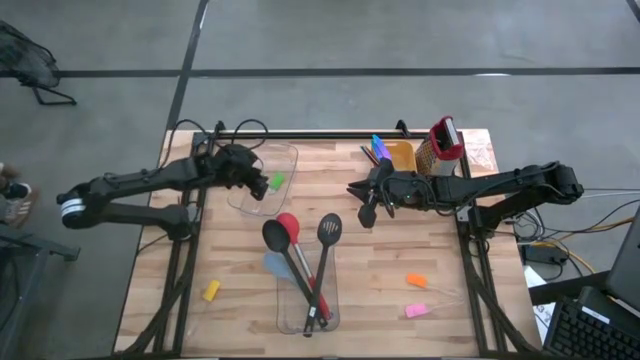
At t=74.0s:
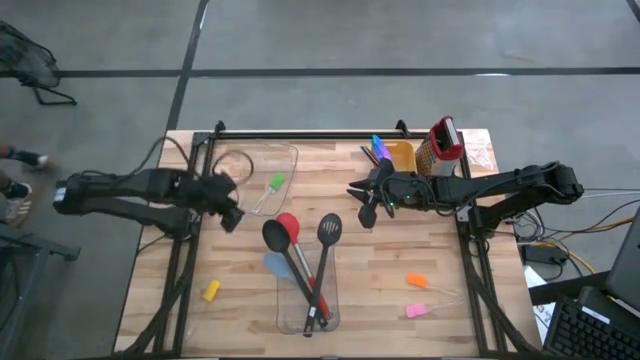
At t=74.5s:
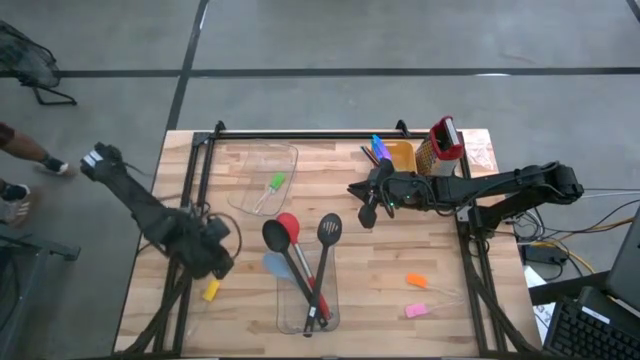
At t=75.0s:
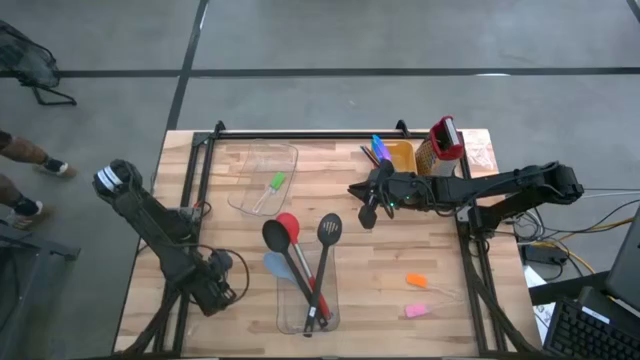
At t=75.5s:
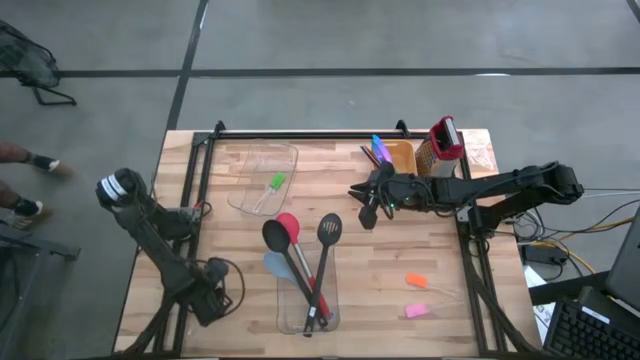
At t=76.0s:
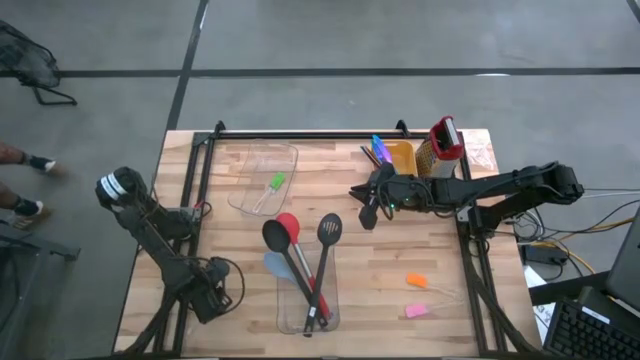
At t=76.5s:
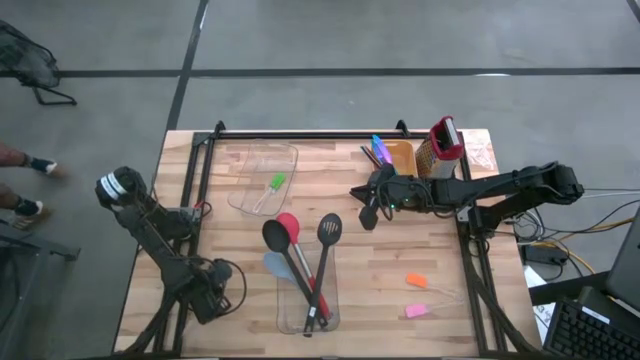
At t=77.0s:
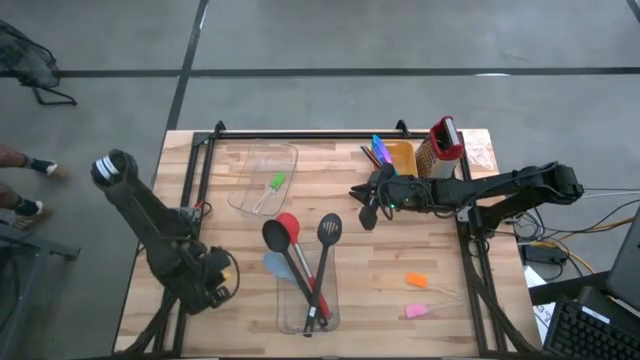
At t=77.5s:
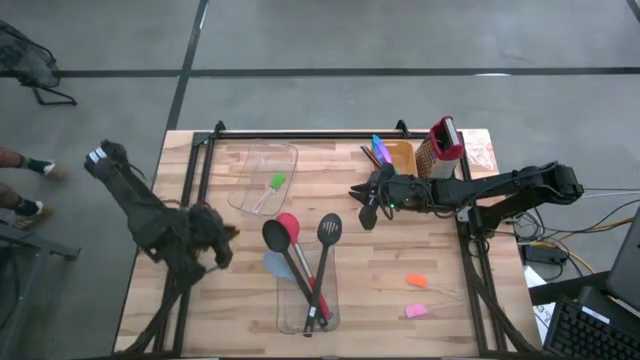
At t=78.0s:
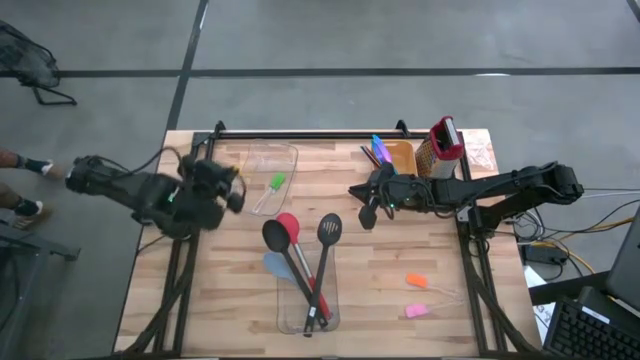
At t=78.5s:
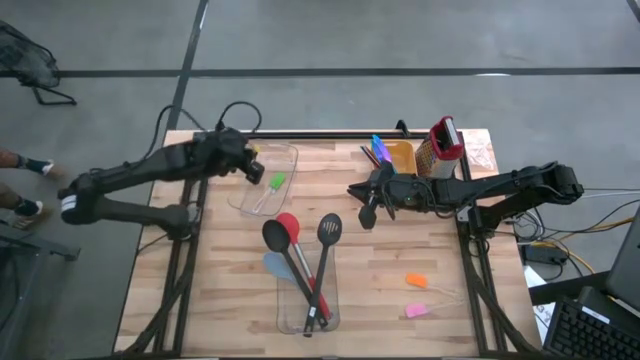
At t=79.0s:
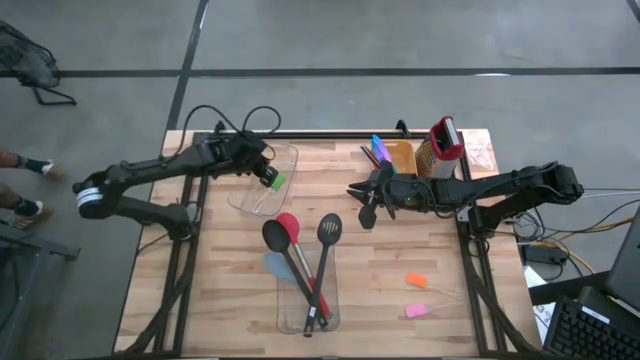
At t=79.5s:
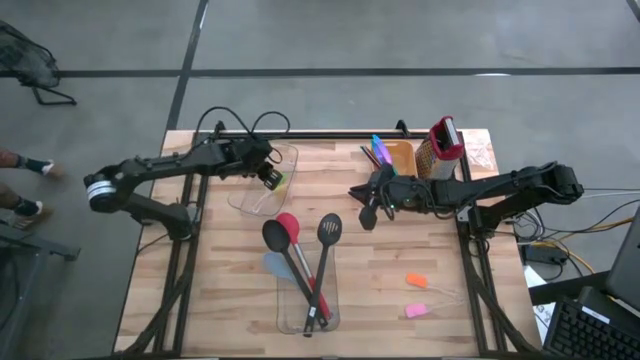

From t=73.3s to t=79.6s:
Task: Pick & Place Kitchen Items
Put the yellow spatula into the top transparent bin

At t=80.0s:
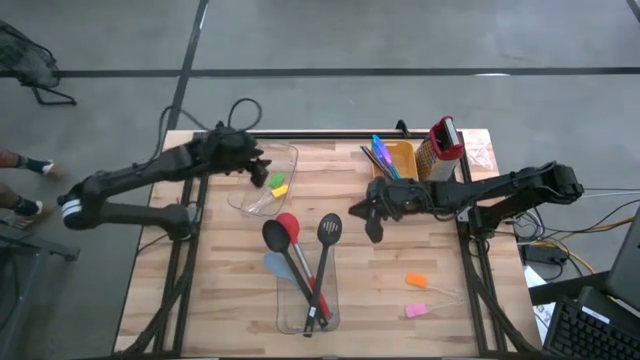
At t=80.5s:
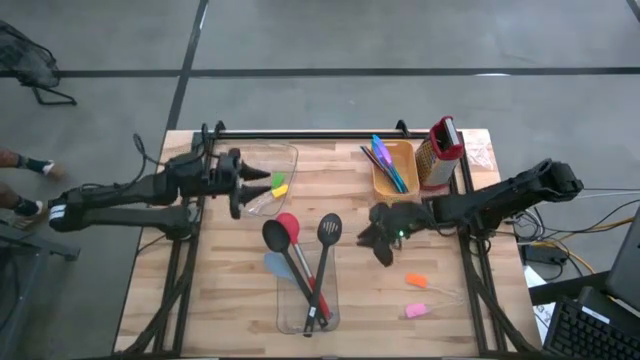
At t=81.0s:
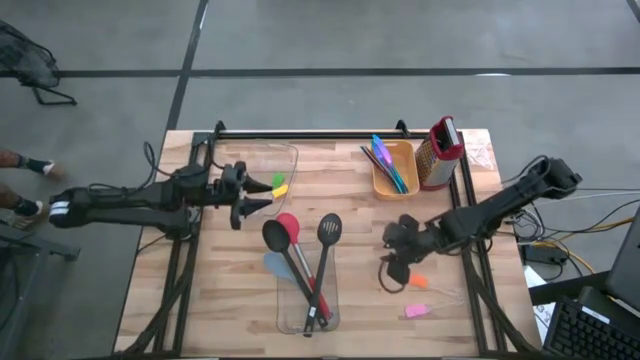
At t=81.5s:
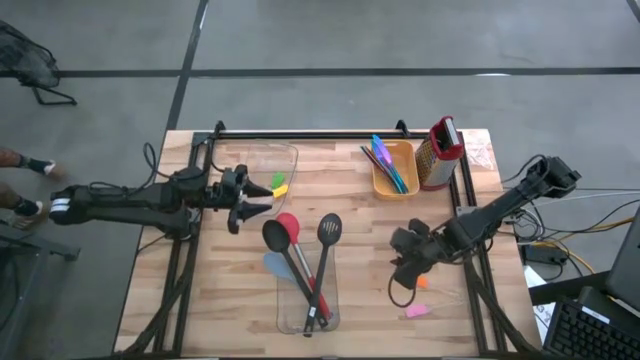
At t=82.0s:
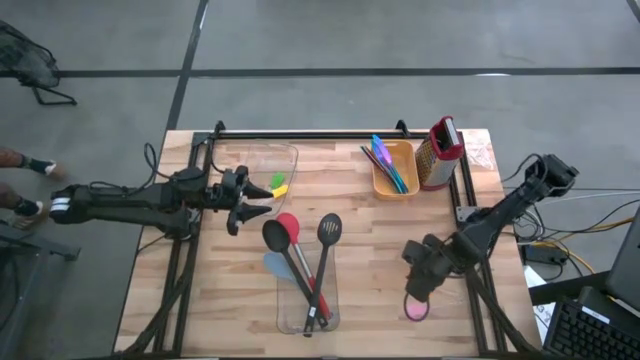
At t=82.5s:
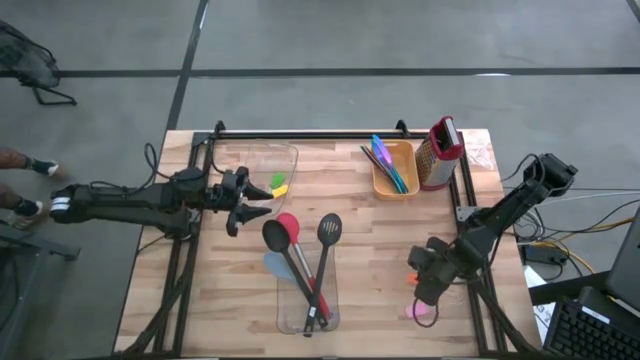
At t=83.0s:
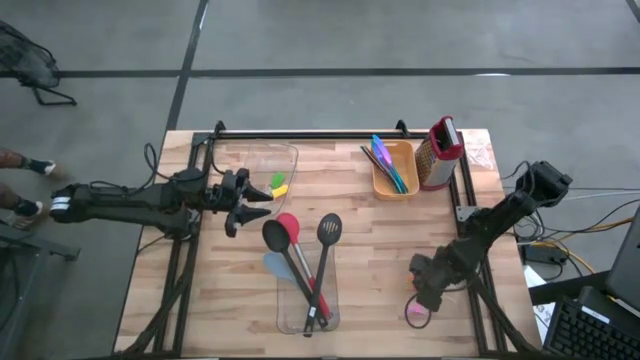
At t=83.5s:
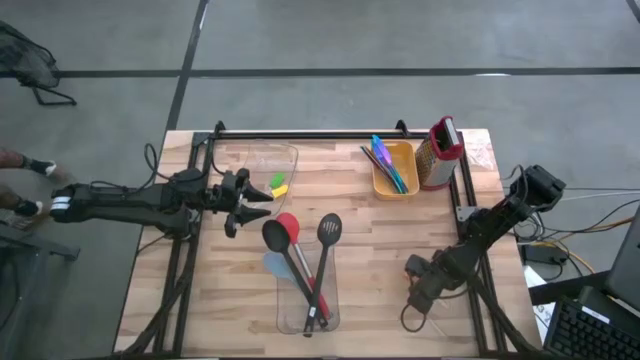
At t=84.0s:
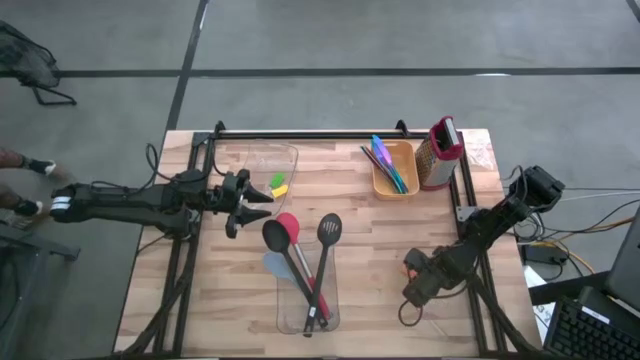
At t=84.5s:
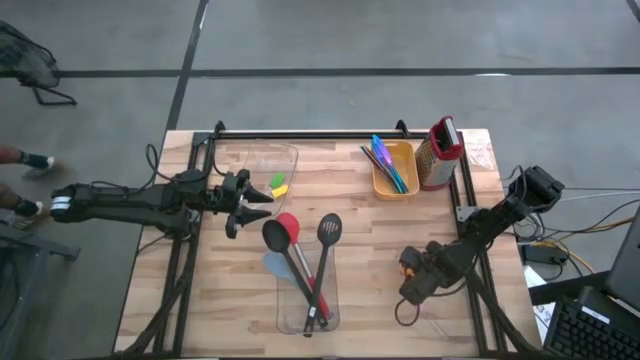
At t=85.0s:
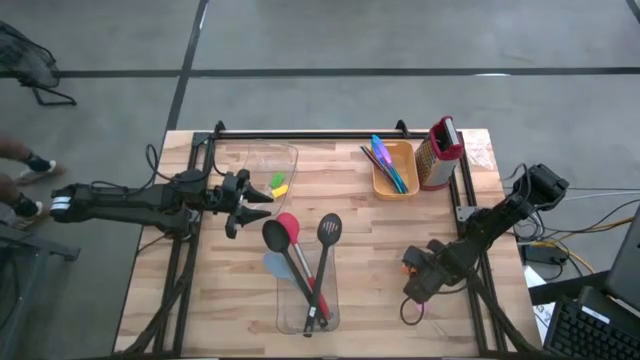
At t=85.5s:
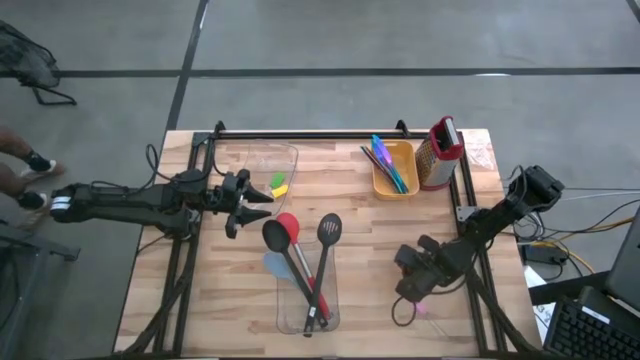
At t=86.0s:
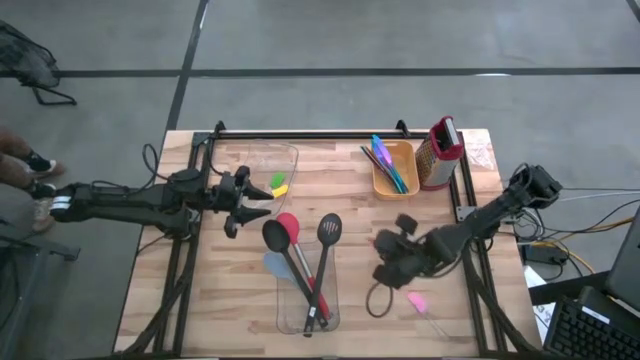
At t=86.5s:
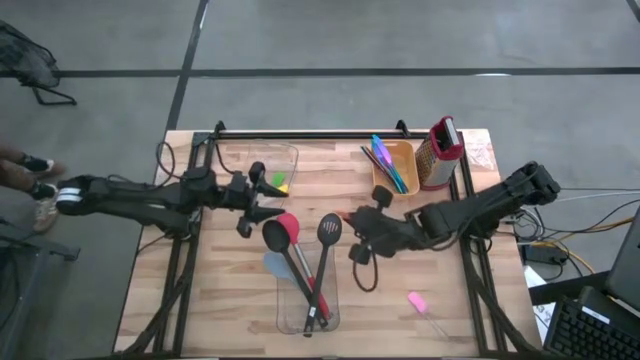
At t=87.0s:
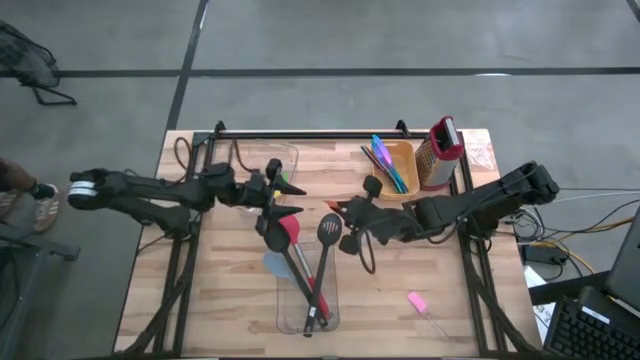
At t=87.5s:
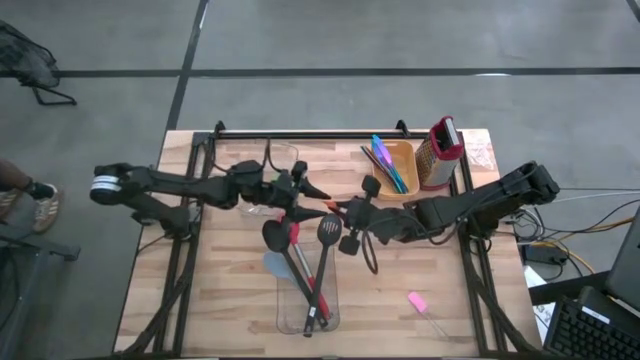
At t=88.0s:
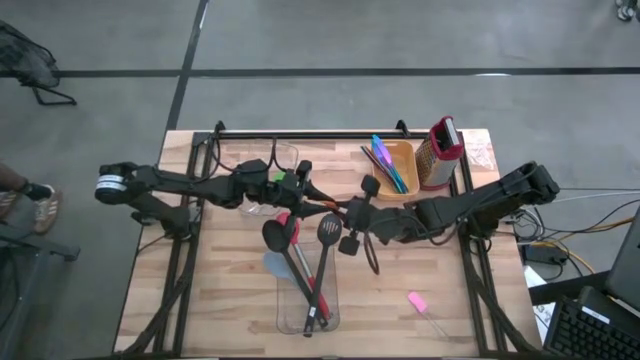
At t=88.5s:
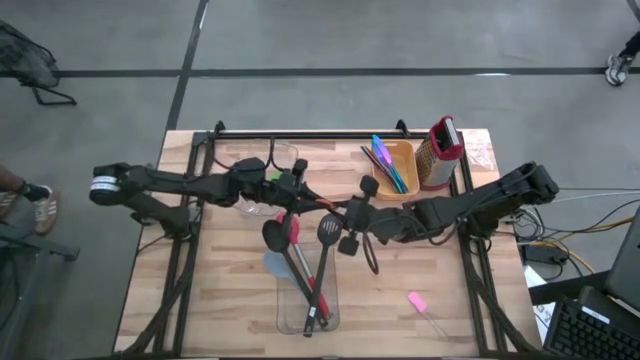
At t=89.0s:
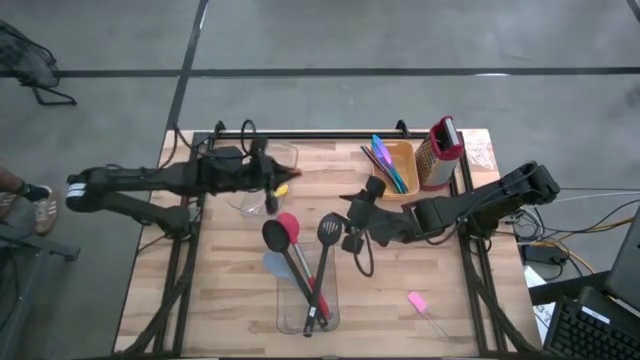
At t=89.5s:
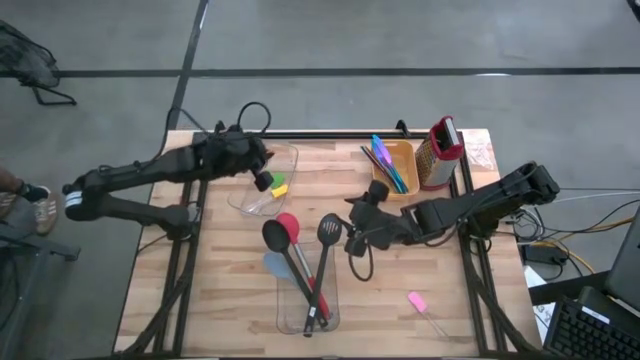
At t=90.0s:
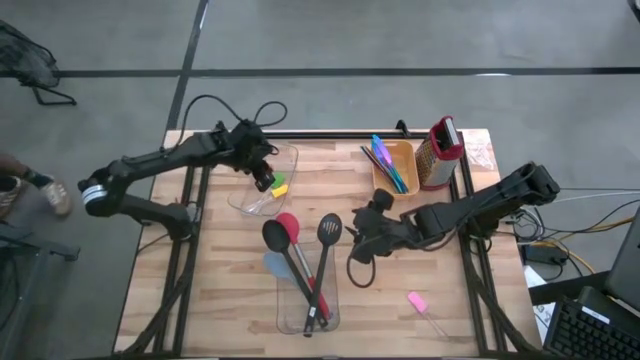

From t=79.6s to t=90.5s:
Put the orange spatula into the top transparent bin

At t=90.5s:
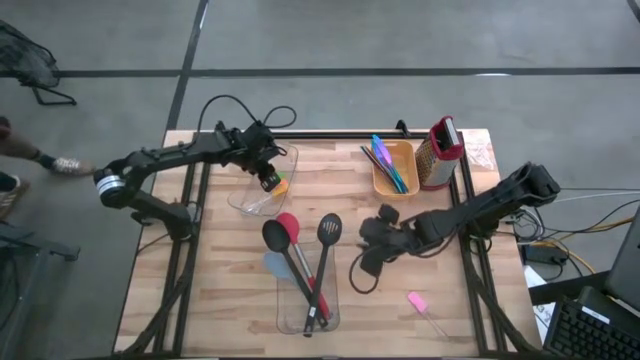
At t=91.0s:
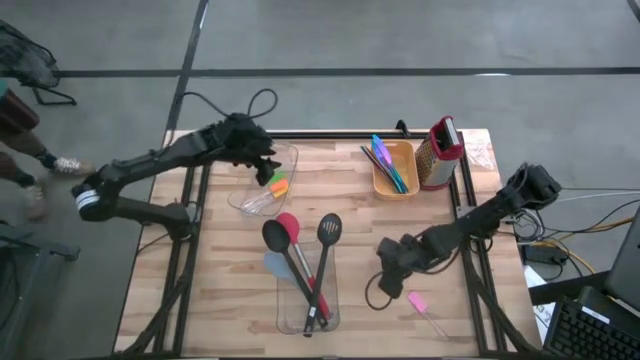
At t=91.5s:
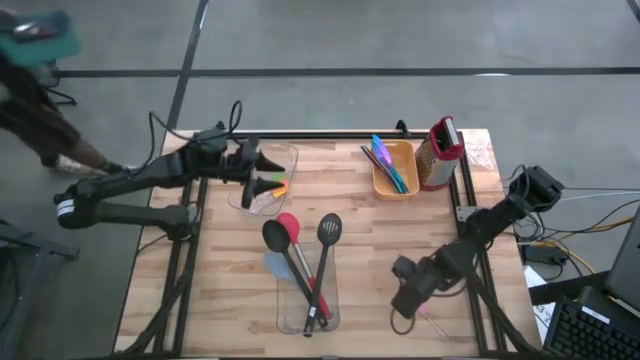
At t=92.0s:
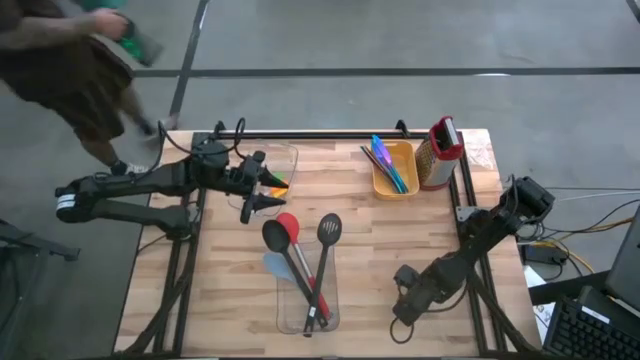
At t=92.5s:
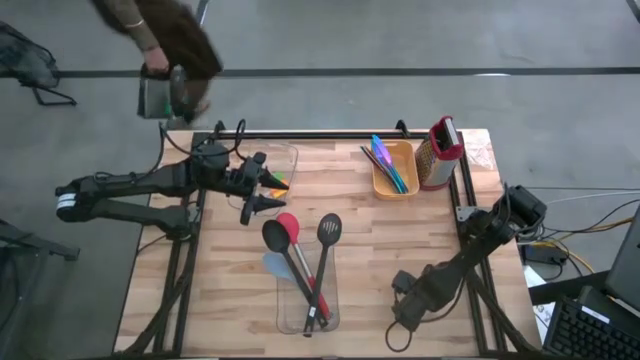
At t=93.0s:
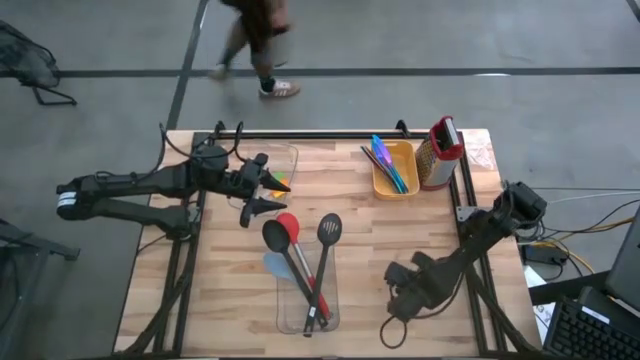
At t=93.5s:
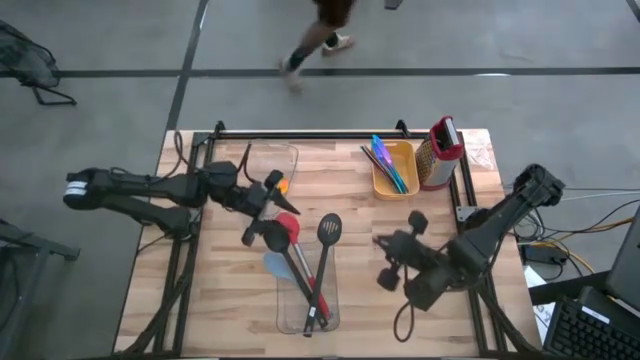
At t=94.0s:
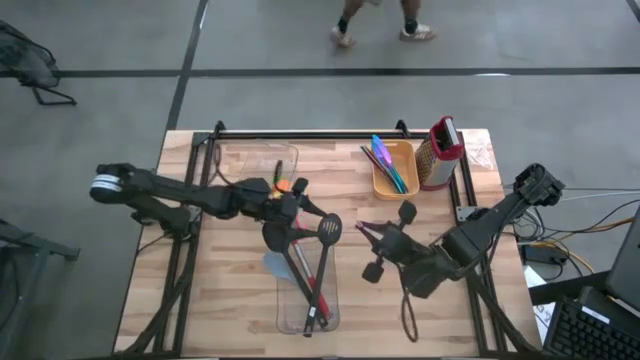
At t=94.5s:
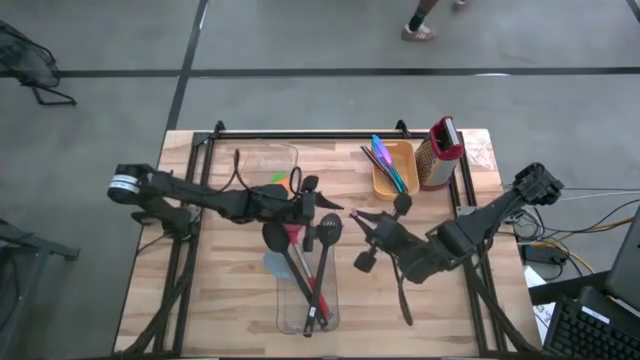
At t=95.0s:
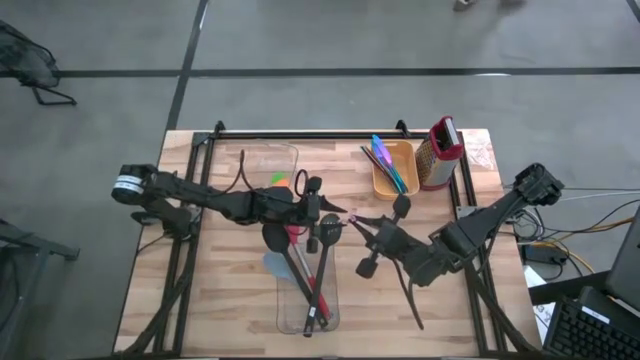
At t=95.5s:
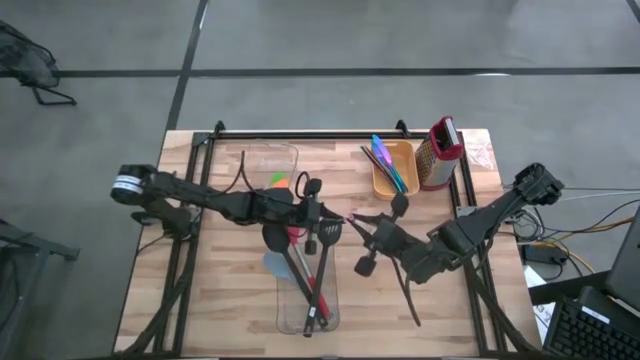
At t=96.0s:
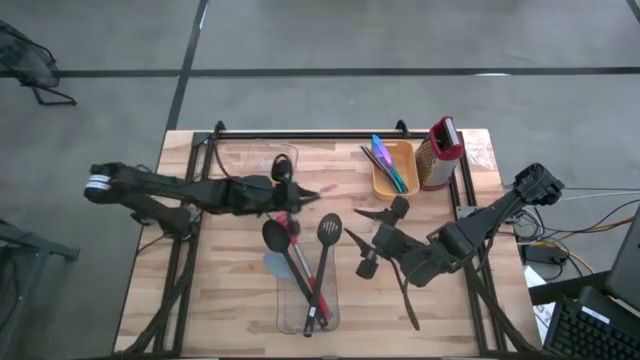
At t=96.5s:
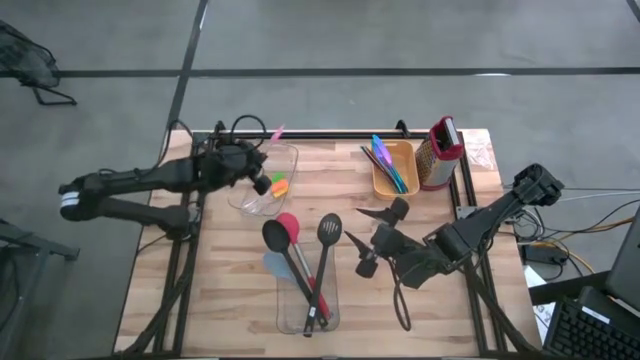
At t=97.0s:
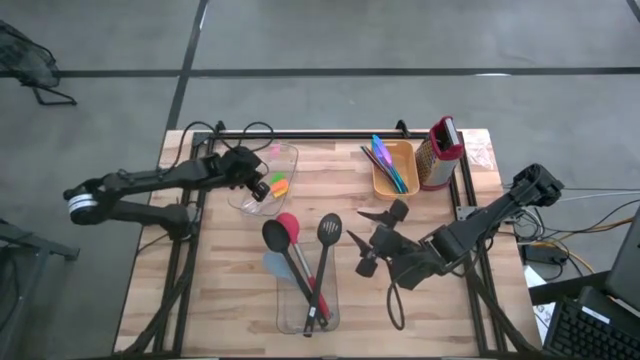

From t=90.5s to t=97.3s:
Put the pink spatula into the top transparent bin
